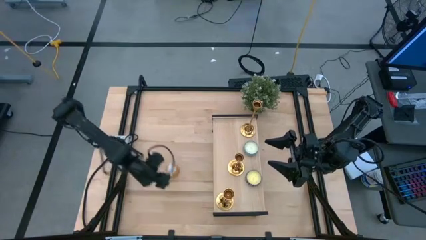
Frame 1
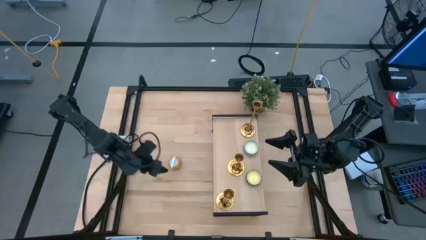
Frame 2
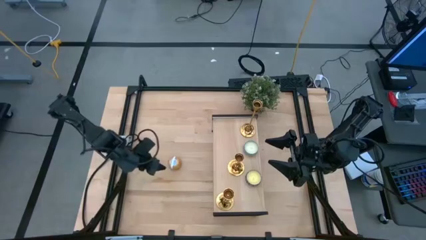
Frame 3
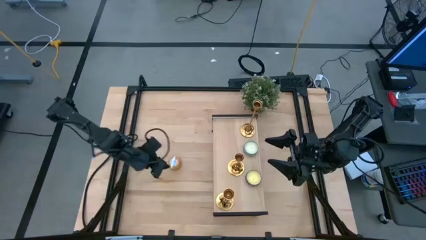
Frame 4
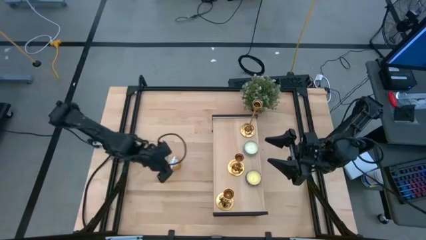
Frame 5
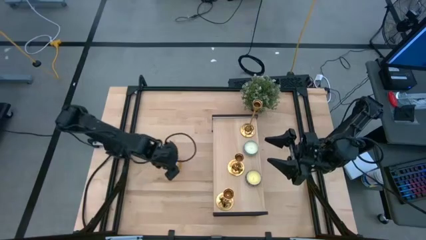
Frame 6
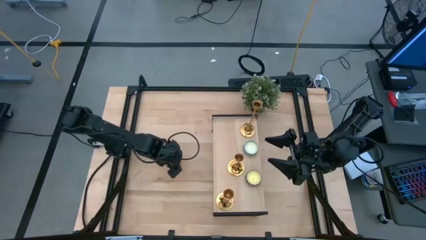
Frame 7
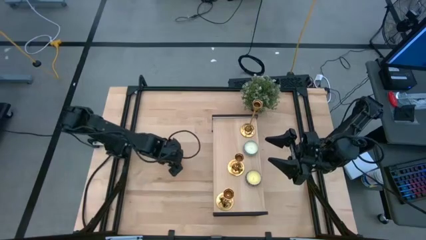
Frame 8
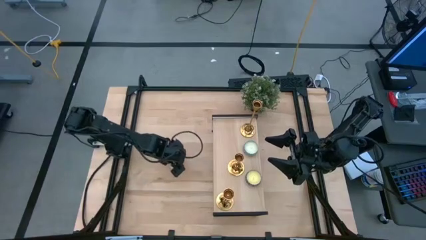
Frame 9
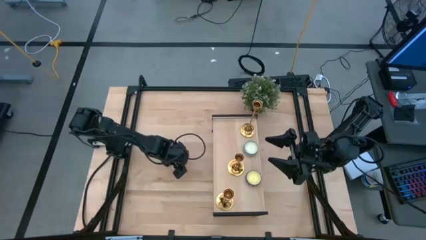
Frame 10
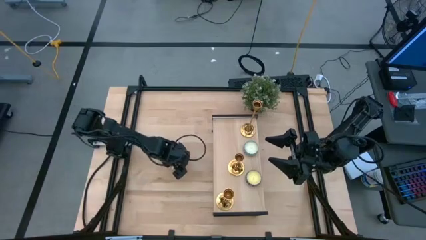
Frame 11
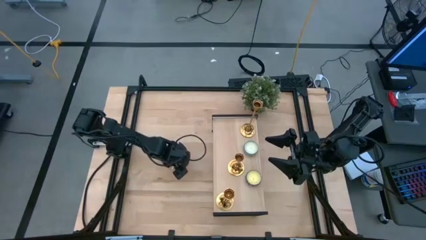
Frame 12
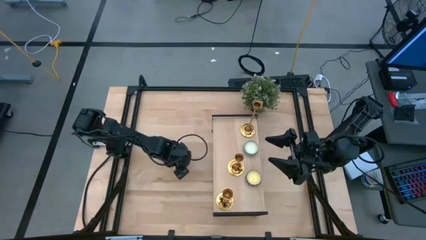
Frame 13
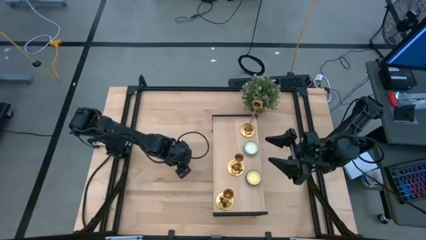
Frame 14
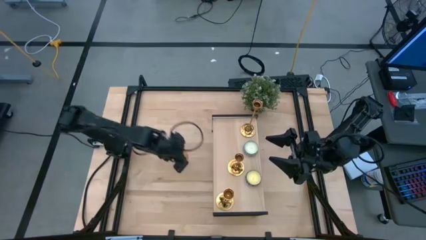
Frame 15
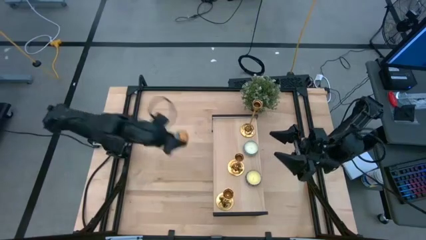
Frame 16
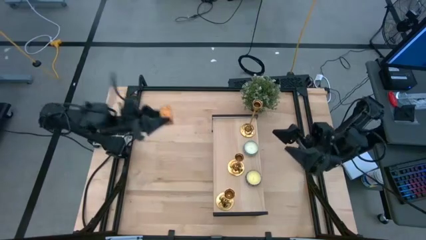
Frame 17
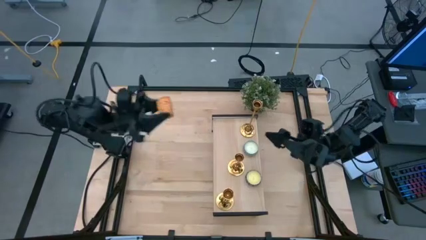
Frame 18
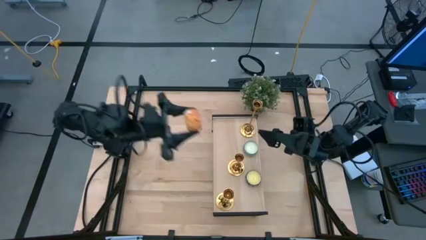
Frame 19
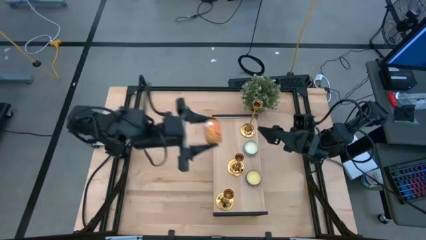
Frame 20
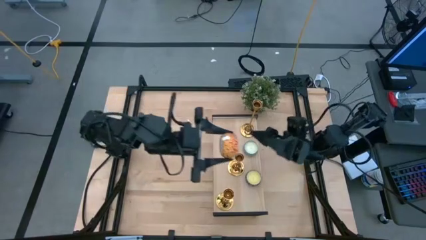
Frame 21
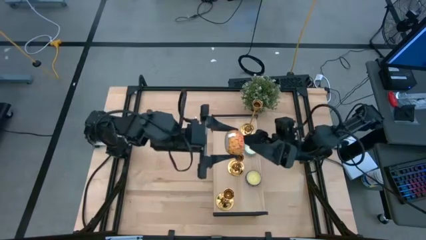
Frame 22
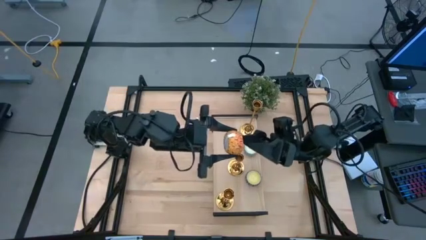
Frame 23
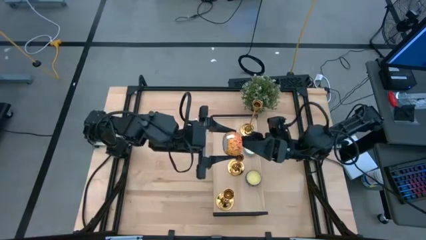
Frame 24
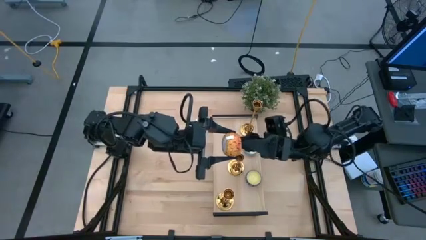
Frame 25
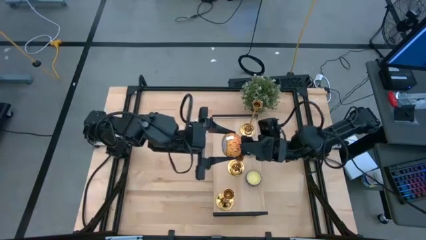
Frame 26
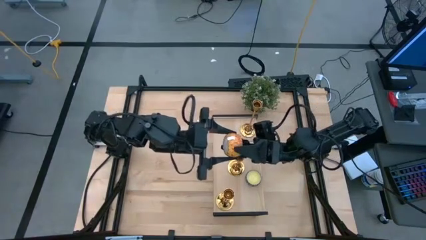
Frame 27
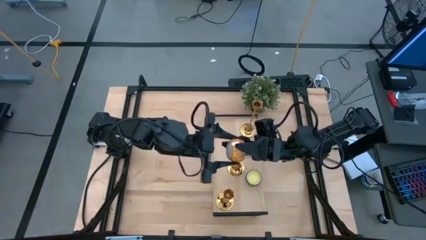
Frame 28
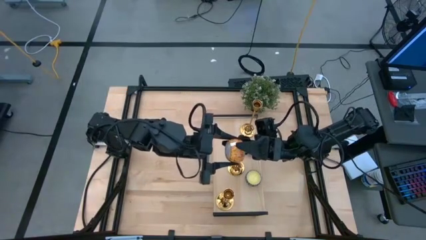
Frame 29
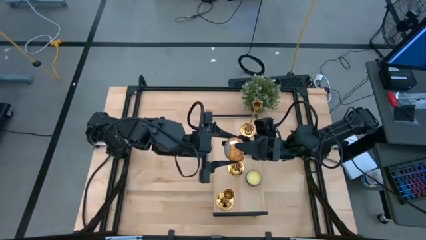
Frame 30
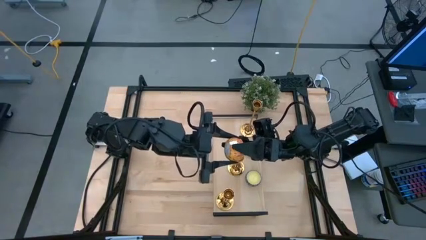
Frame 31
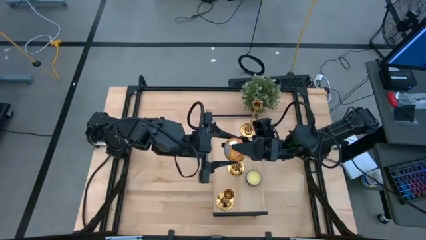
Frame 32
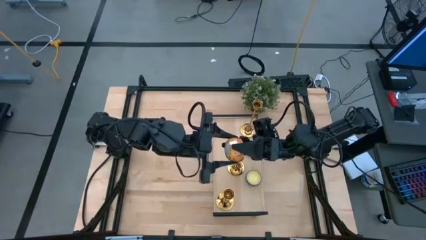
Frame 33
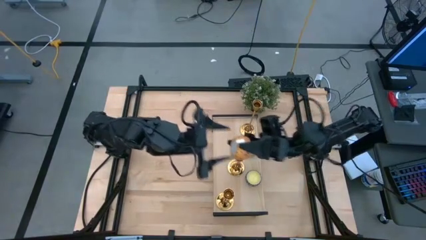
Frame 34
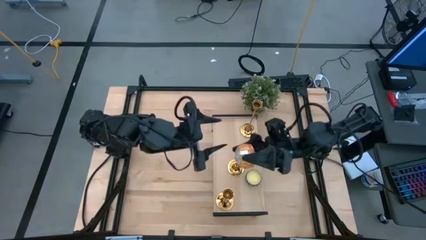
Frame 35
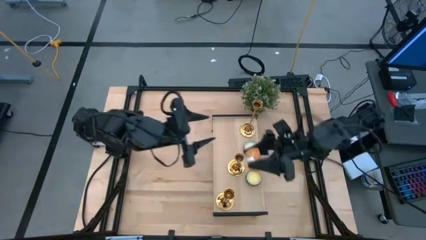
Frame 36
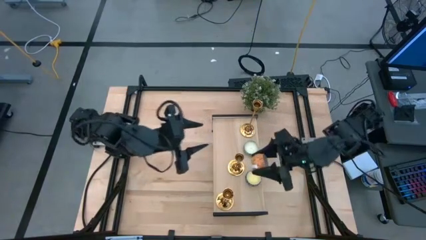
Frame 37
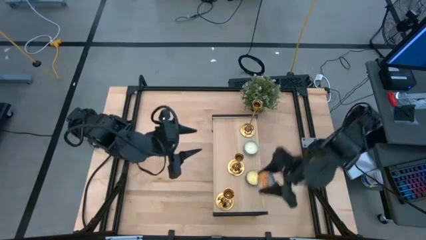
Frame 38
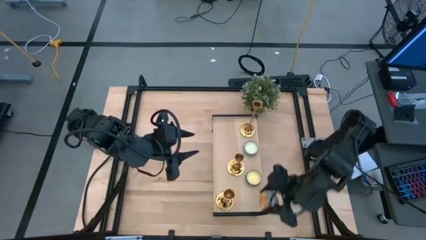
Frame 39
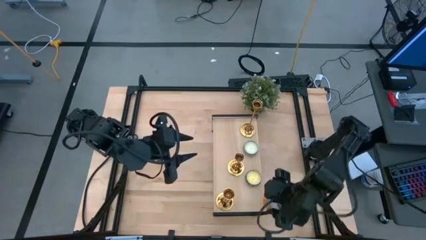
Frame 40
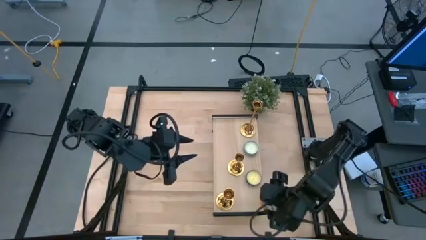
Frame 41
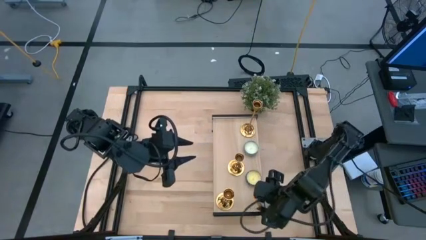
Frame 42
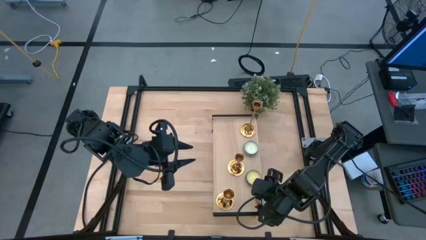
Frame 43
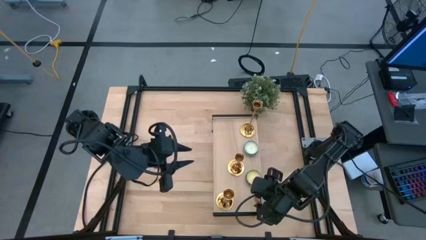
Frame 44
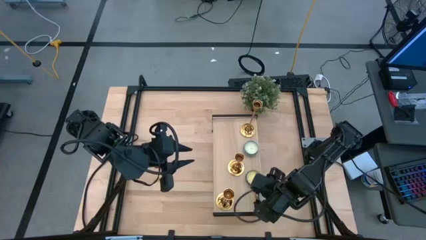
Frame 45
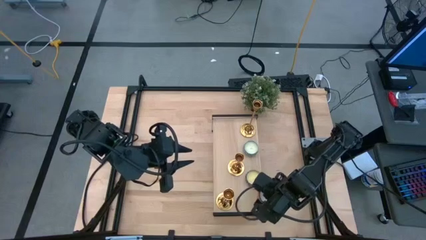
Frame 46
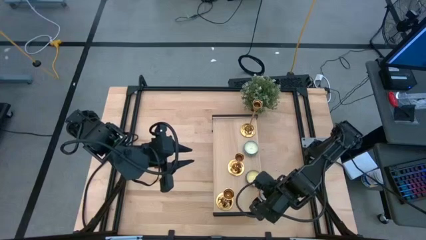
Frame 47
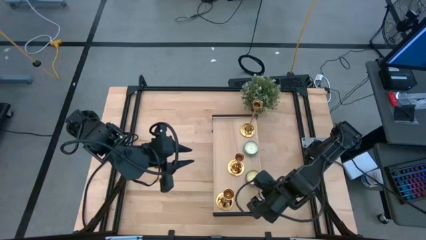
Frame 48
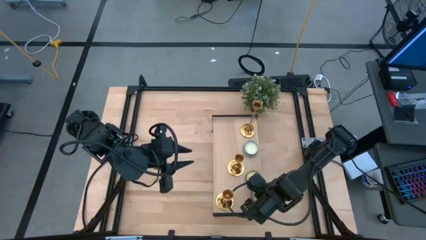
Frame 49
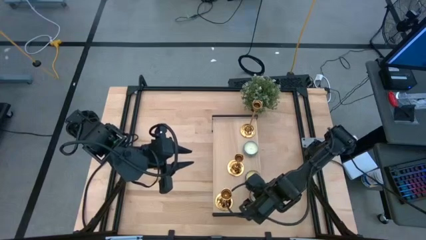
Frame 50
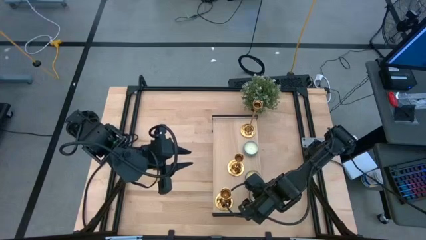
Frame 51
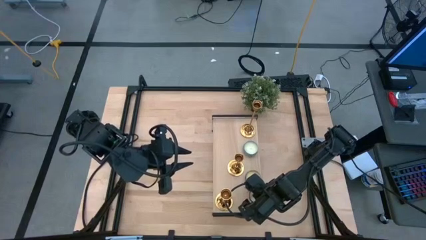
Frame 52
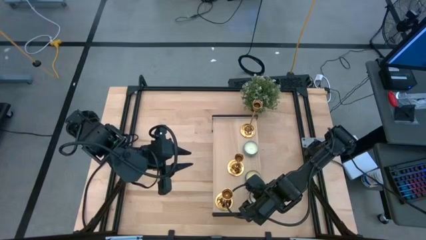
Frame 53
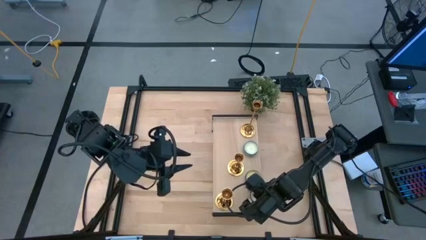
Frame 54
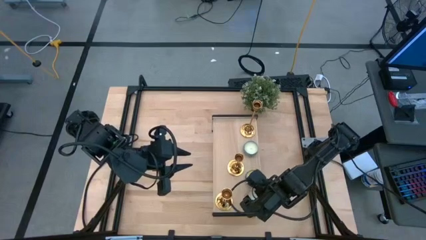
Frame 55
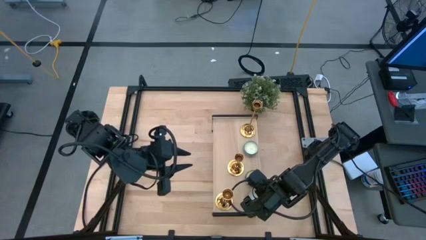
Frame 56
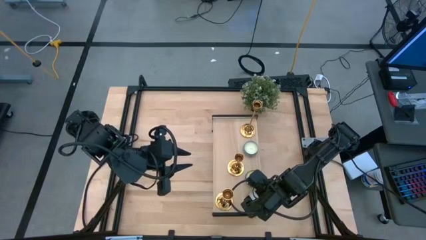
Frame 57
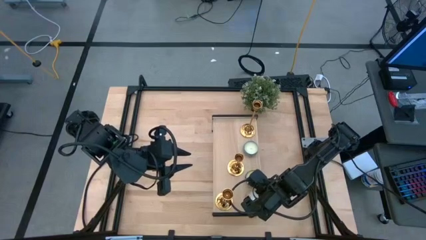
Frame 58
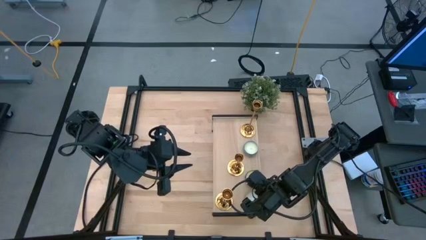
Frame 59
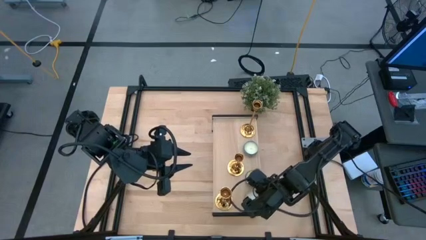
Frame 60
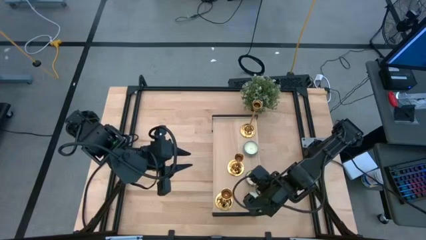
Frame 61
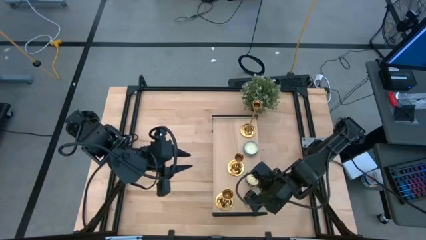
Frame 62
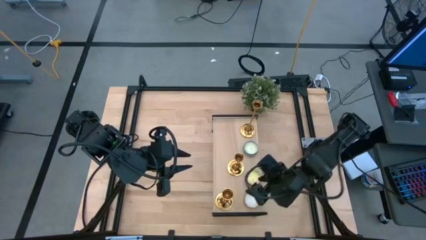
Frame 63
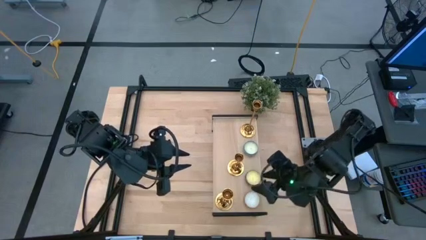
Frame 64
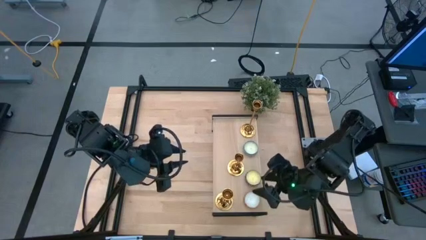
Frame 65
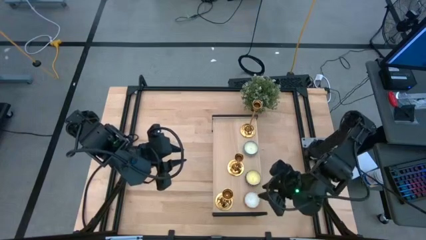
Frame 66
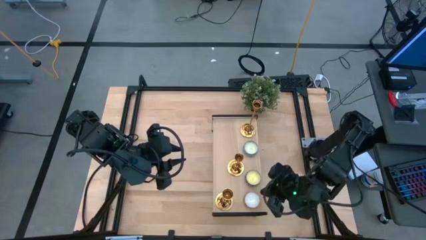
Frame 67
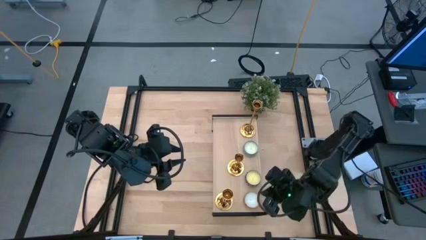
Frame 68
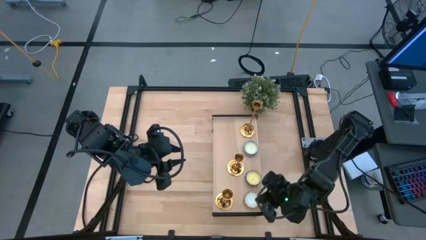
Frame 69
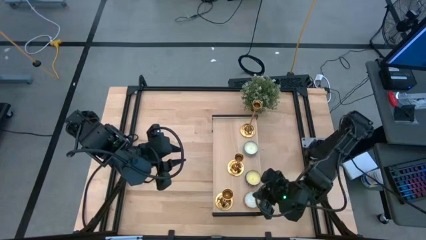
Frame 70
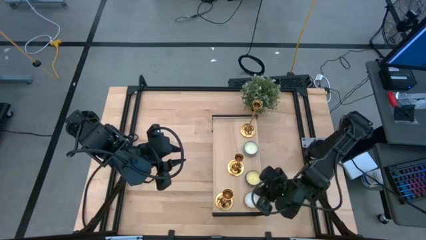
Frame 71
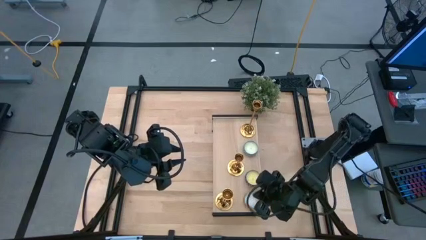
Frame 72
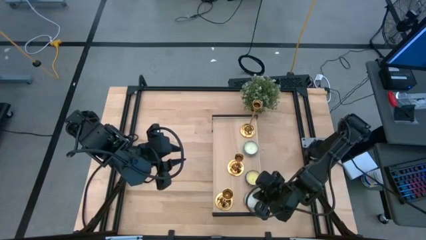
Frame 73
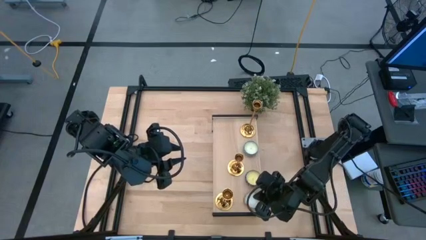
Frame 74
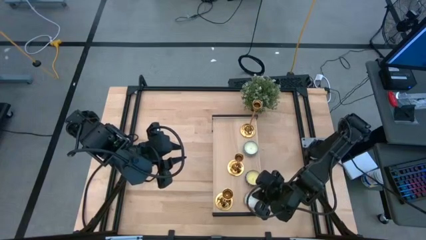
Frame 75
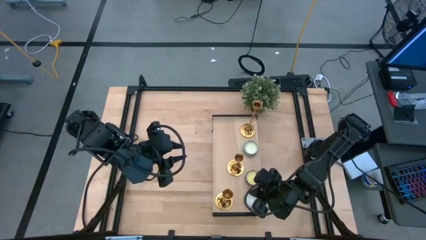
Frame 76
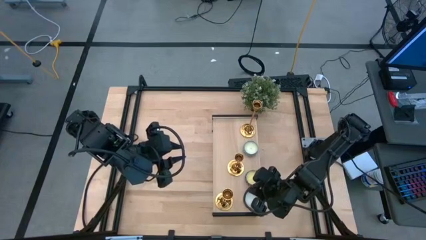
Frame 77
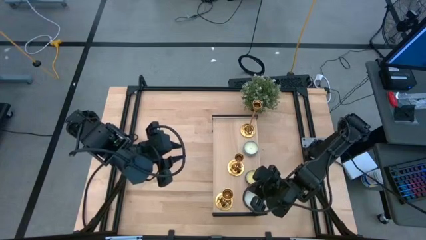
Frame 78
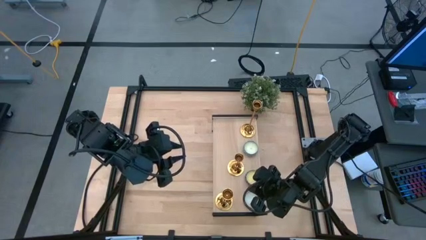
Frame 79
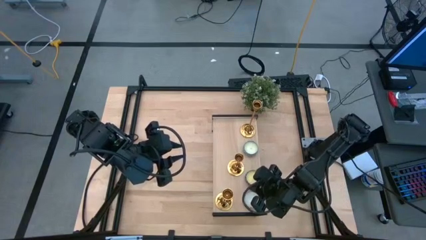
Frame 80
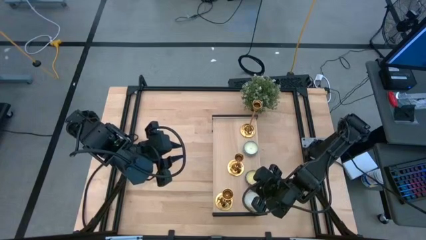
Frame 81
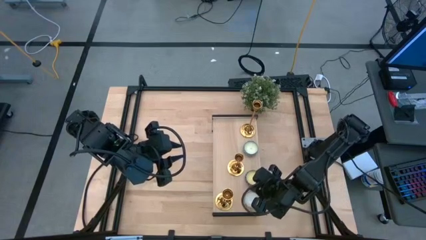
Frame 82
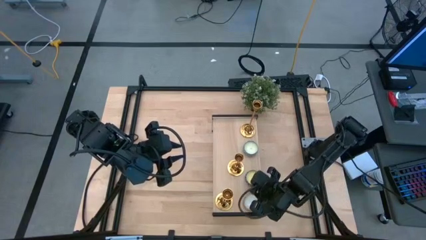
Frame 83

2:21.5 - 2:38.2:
Task: Pick & Place candle stick holders
Put the orange patterned scented candle on the shelf
